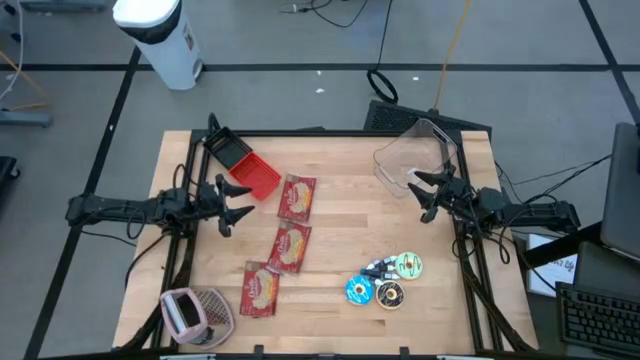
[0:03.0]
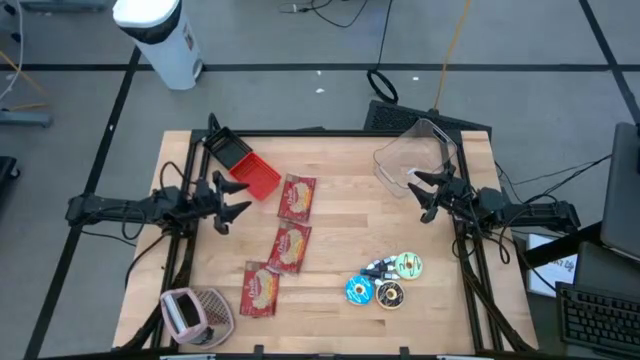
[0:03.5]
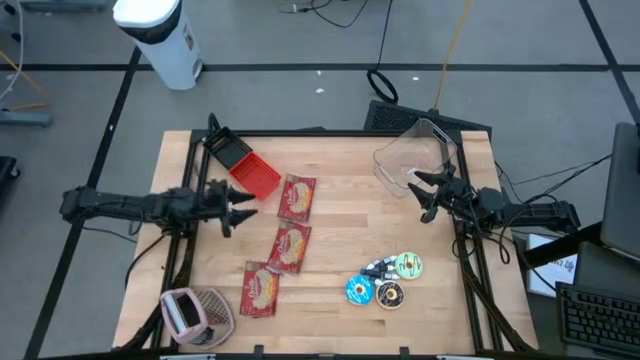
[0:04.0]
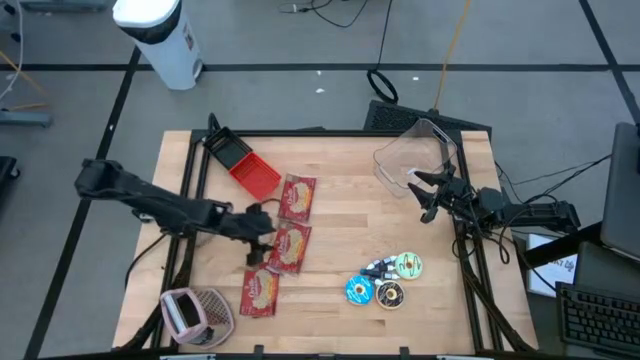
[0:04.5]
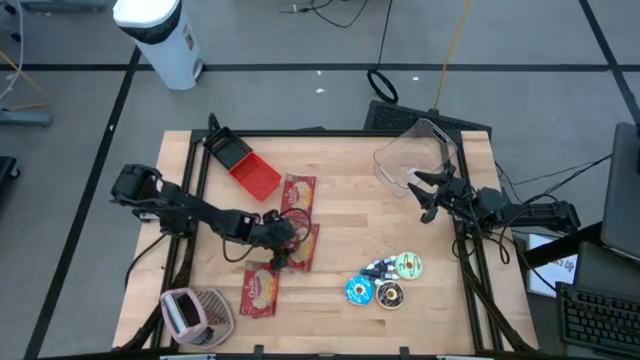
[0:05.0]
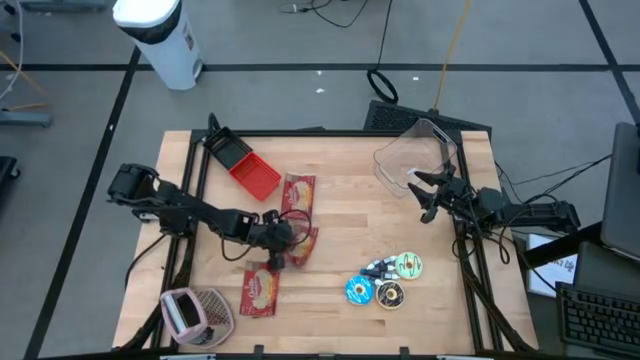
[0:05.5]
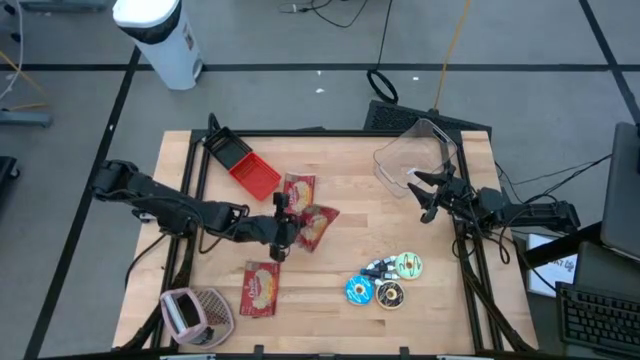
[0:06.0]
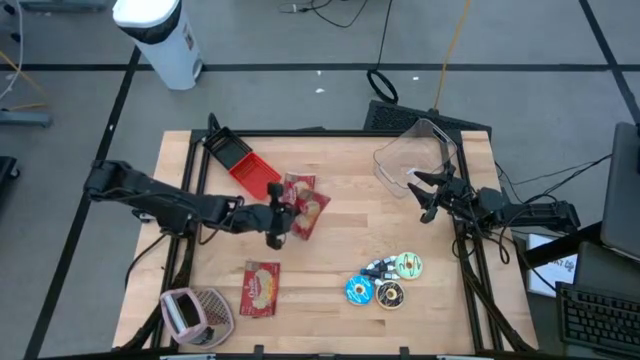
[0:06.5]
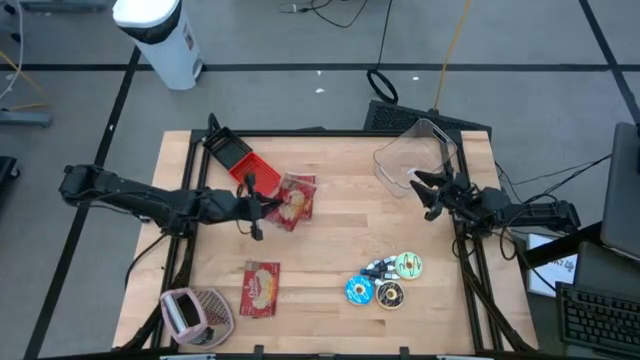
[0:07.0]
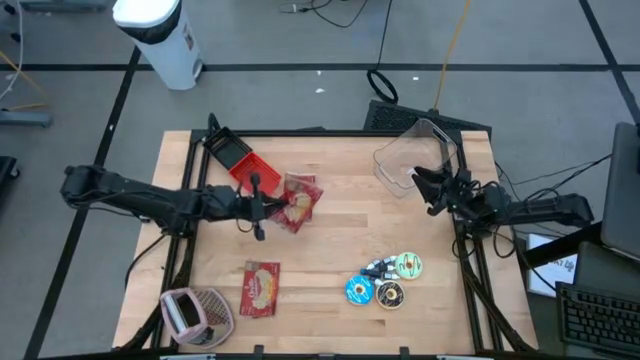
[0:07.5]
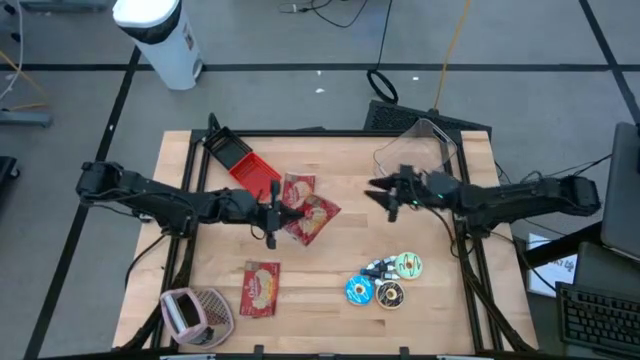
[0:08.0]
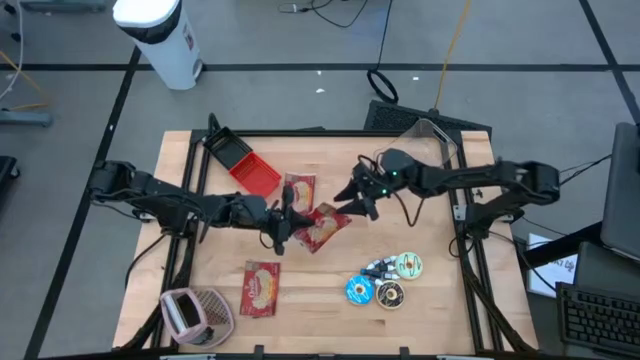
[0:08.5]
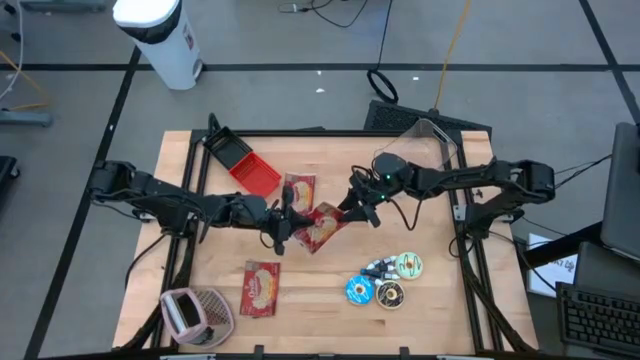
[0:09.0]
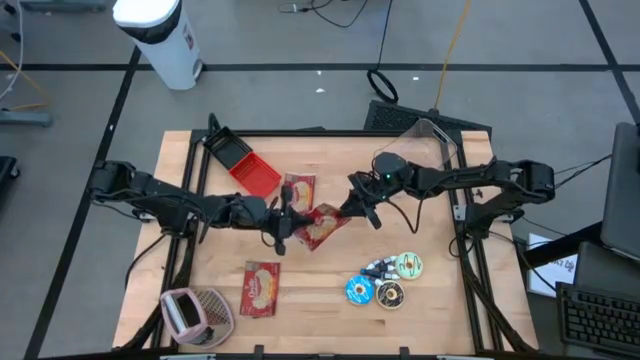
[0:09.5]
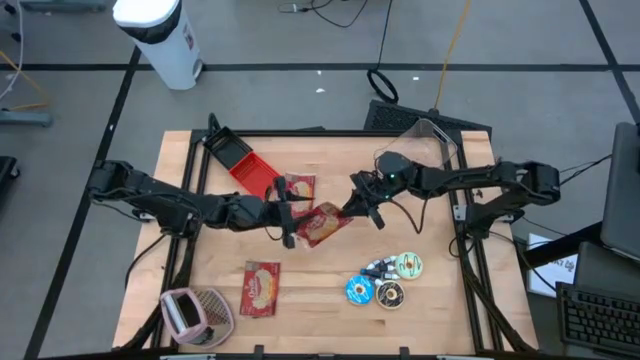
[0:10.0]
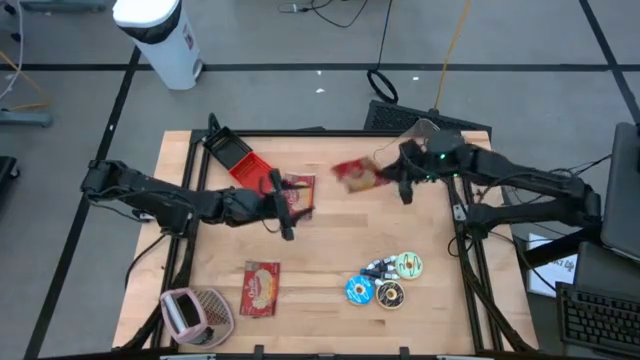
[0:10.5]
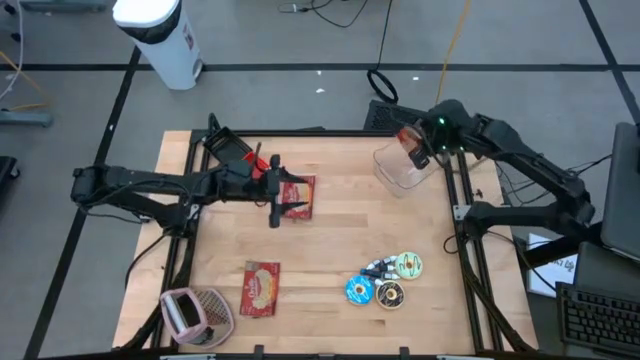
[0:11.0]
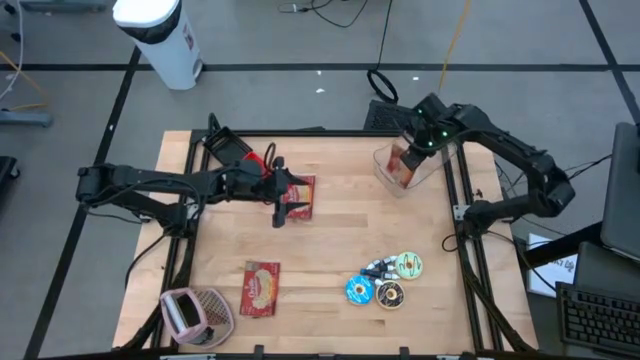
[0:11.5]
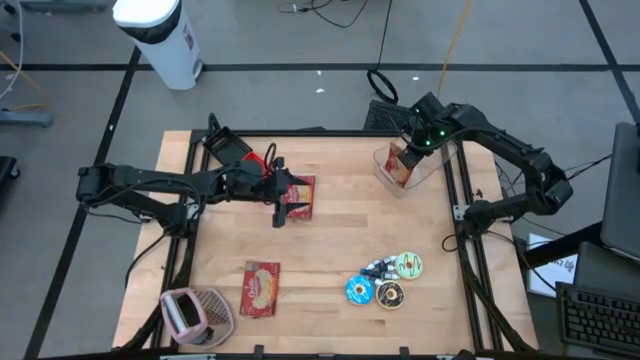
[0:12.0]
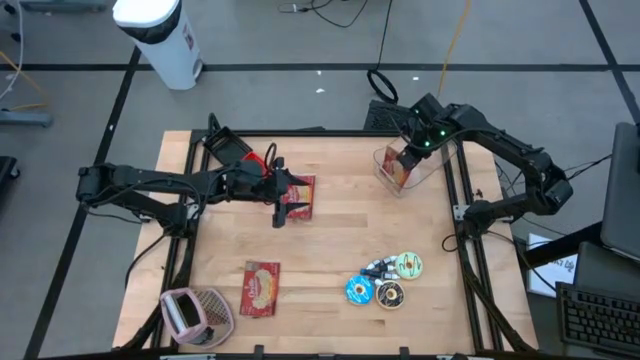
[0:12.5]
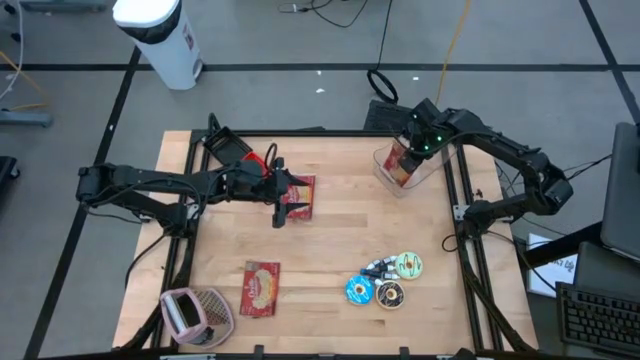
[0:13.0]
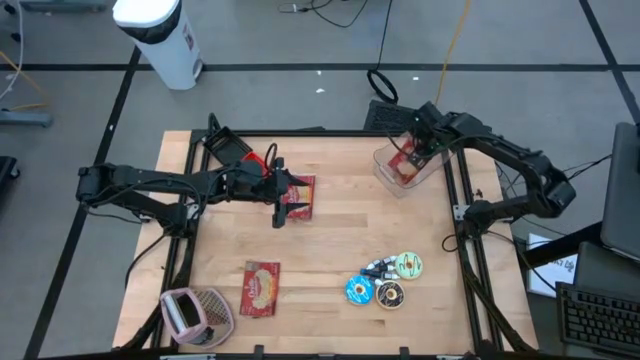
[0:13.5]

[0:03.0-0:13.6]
Put the middle red popcorn bag into the transparent bin

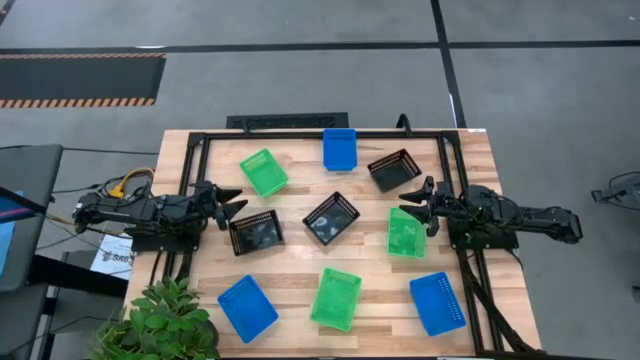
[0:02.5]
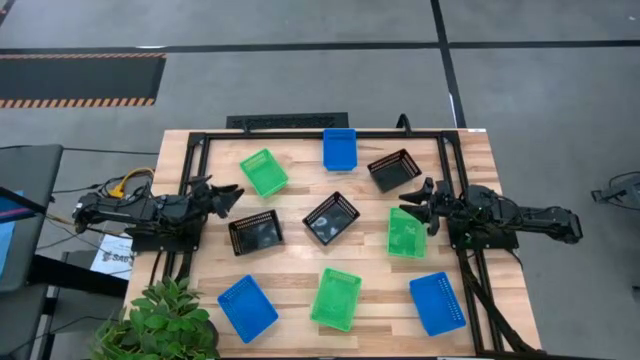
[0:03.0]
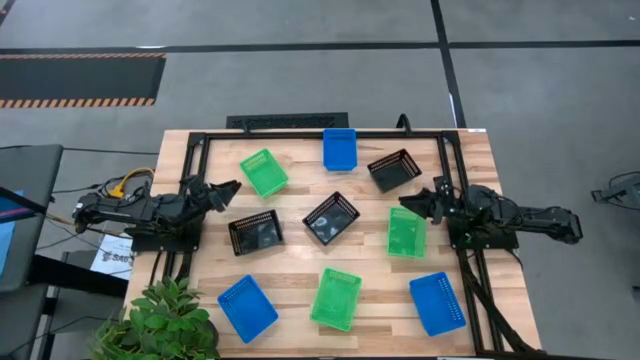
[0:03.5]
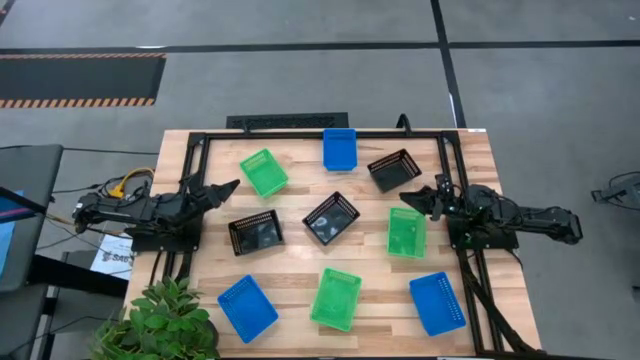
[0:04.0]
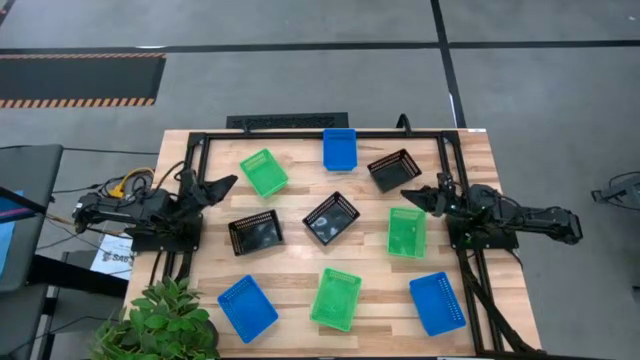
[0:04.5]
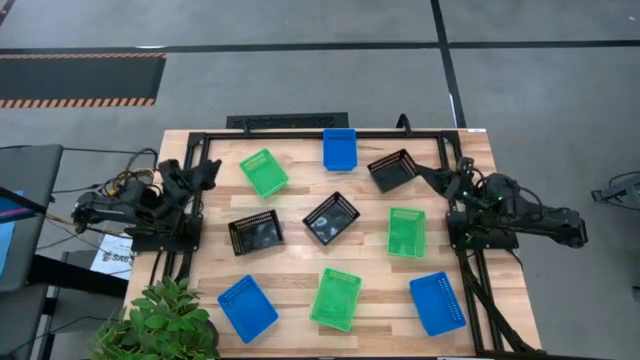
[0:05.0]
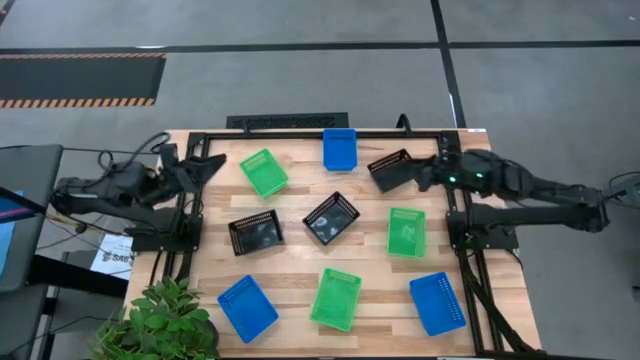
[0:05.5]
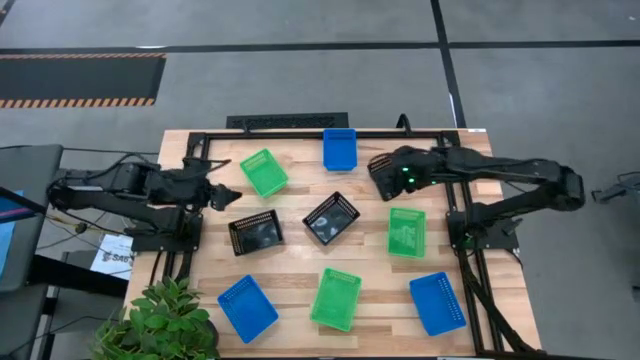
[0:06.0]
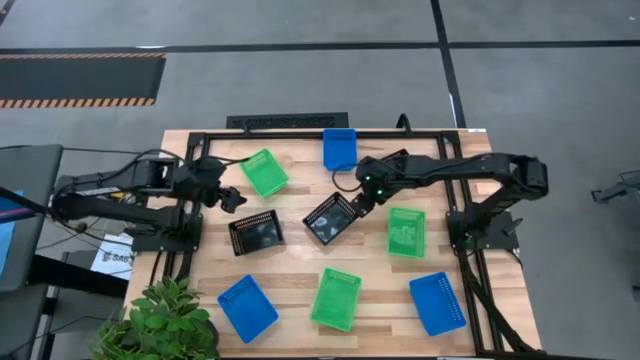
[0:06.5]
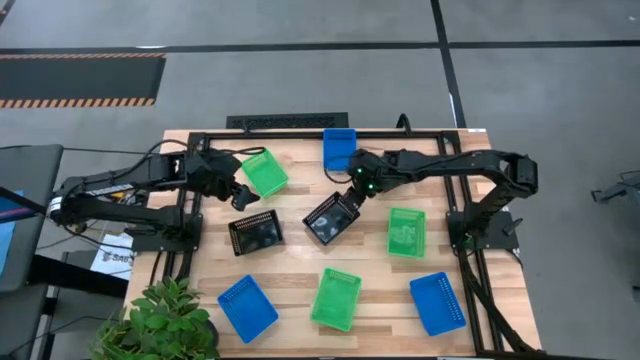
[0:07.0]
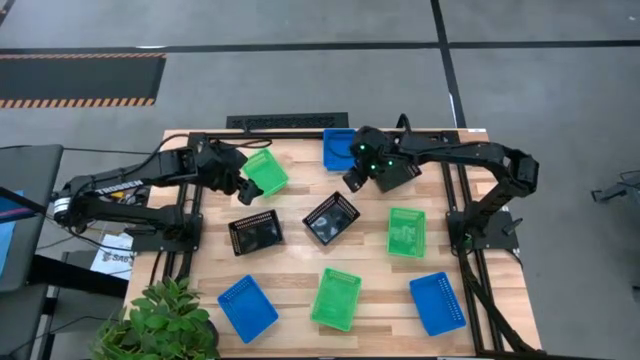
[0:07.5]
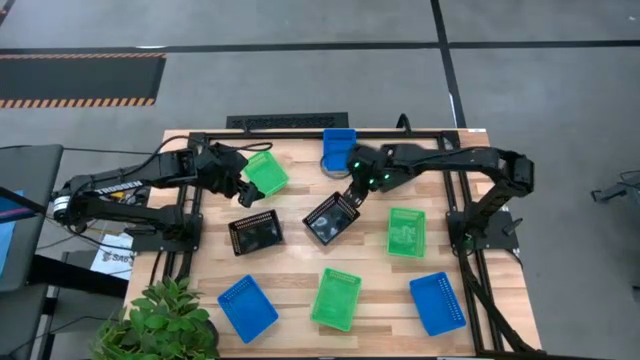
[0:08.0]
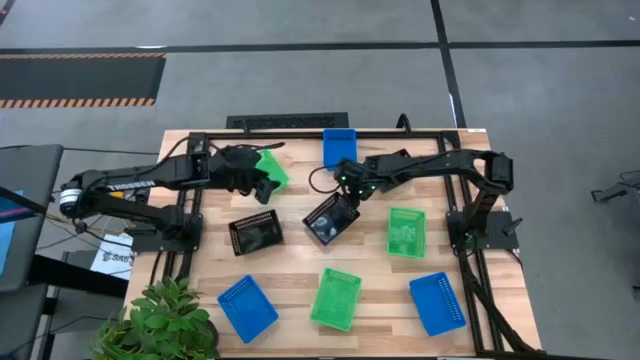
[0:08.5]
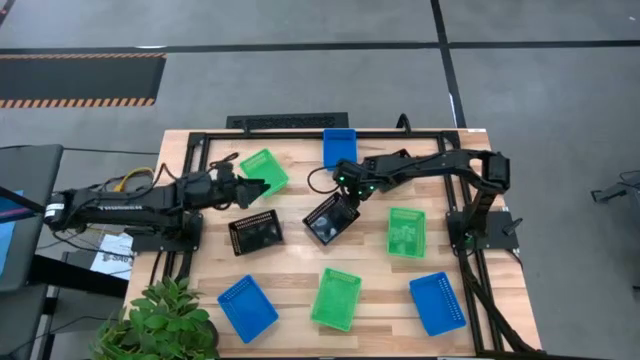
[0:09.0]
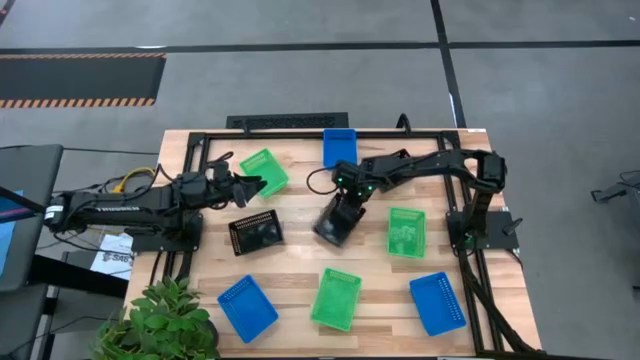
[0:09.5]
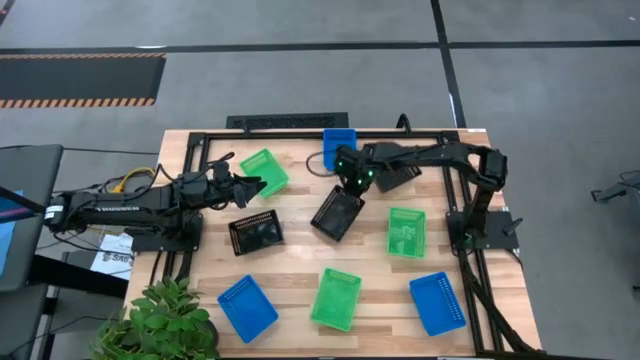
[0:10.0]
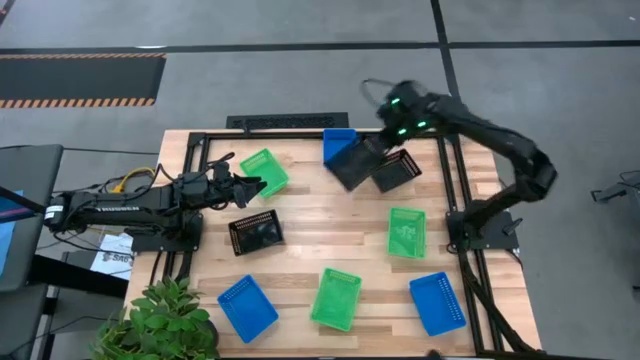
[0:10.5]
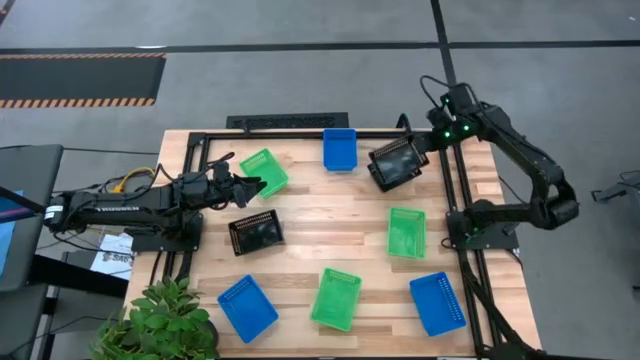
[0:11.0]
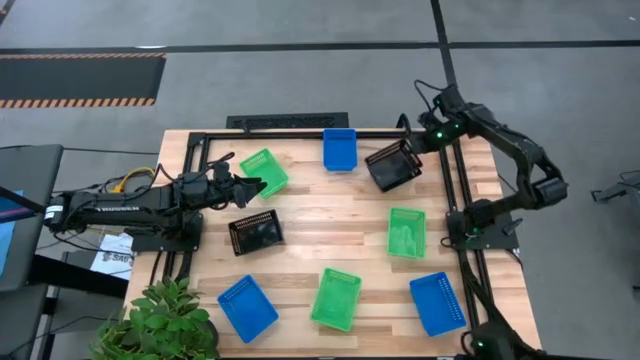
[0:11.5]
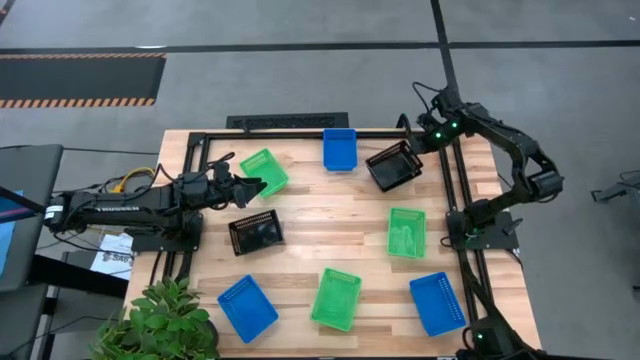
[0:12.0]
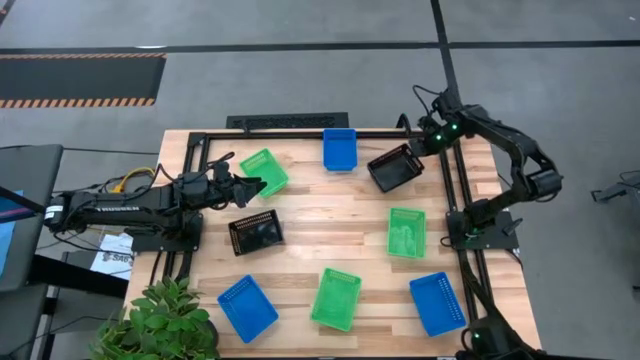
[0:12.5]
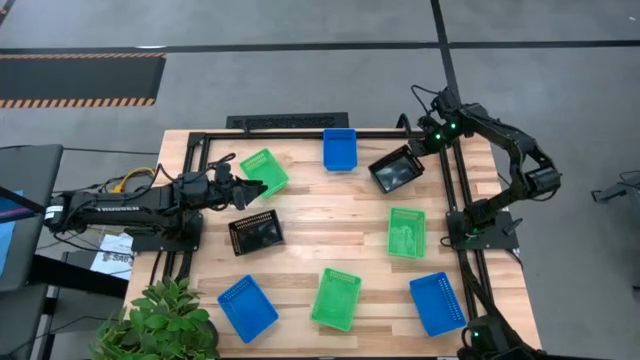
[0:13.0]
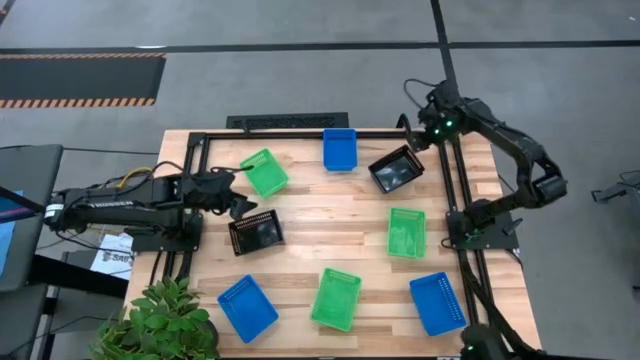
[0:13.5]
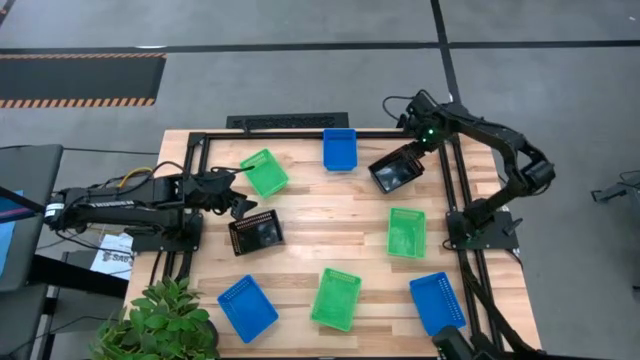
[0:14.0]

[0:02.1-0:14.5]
Stack the middle black bin on the right black bin
